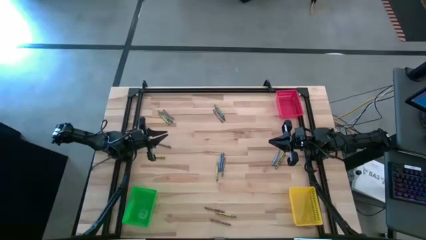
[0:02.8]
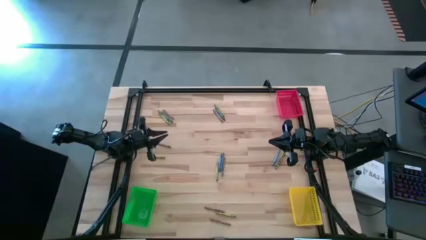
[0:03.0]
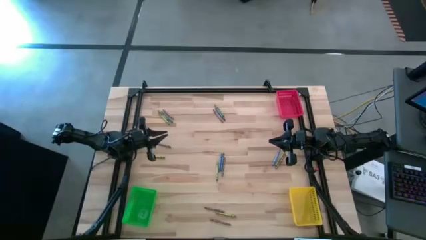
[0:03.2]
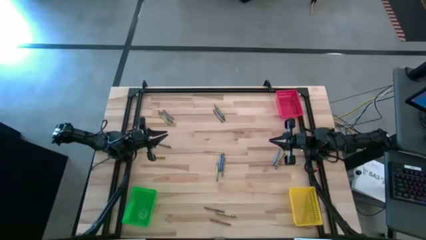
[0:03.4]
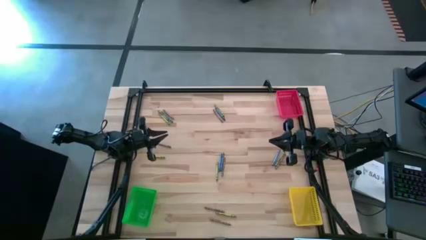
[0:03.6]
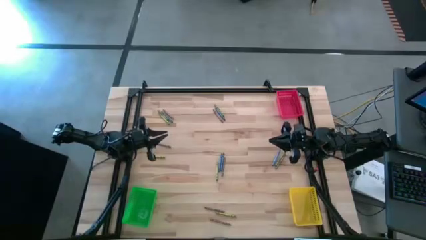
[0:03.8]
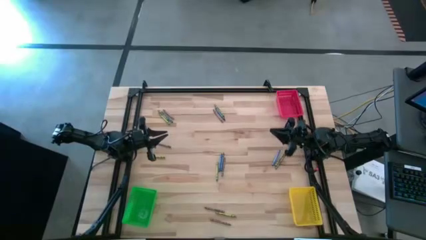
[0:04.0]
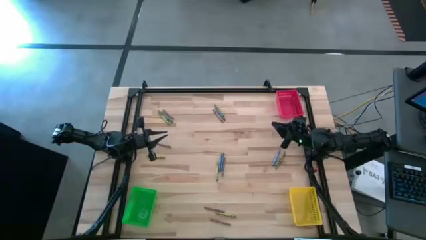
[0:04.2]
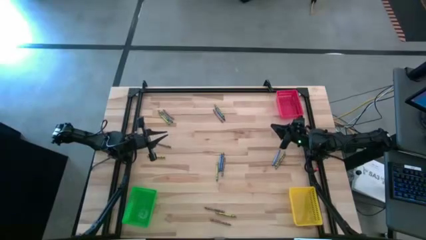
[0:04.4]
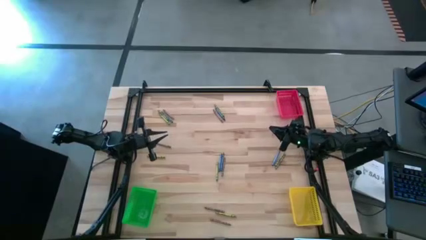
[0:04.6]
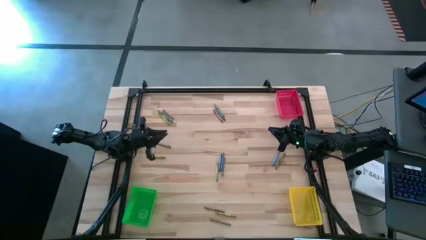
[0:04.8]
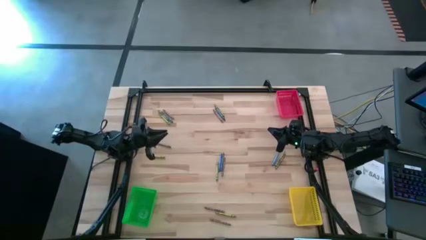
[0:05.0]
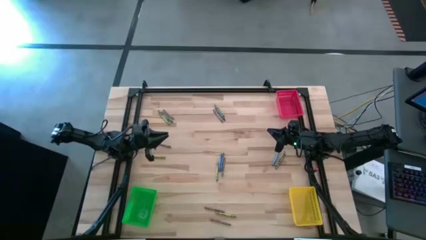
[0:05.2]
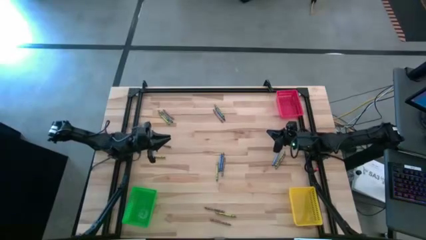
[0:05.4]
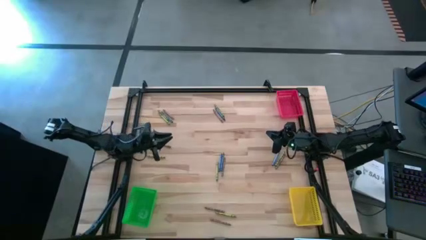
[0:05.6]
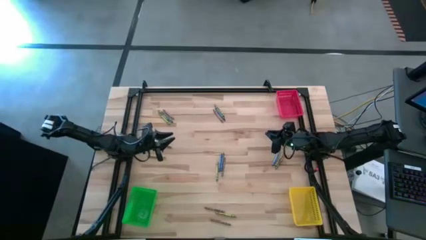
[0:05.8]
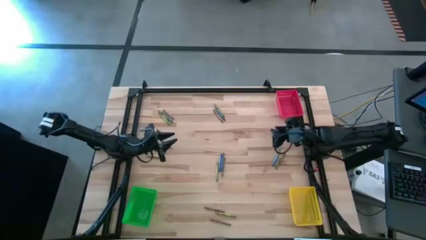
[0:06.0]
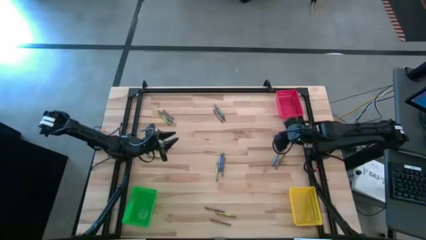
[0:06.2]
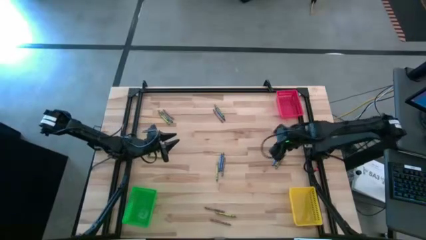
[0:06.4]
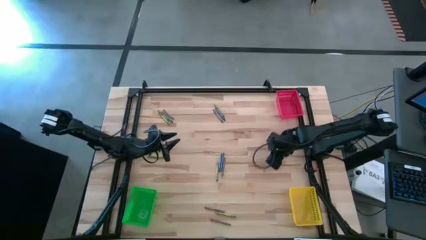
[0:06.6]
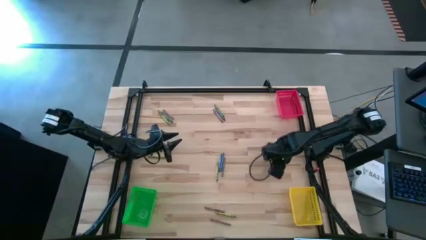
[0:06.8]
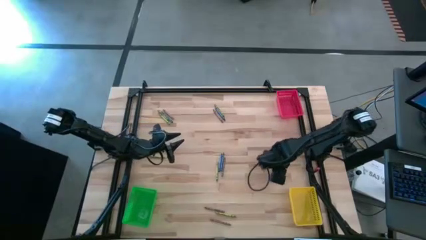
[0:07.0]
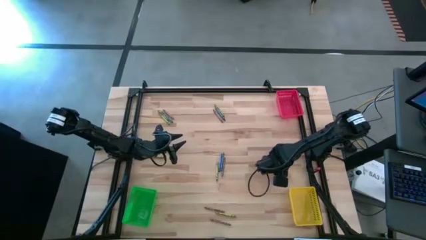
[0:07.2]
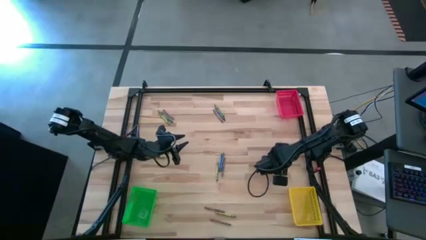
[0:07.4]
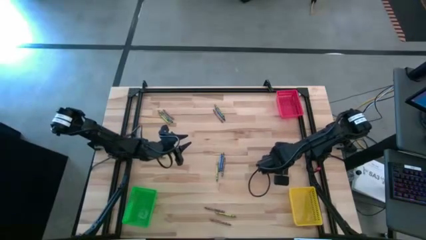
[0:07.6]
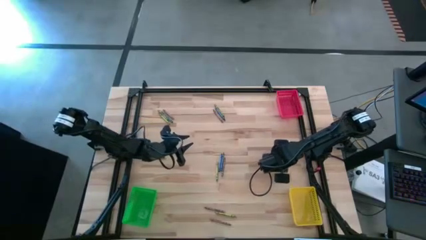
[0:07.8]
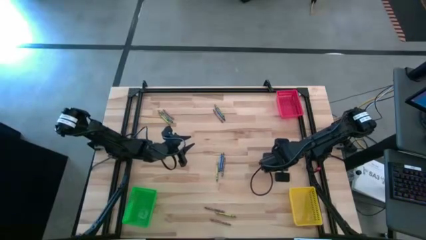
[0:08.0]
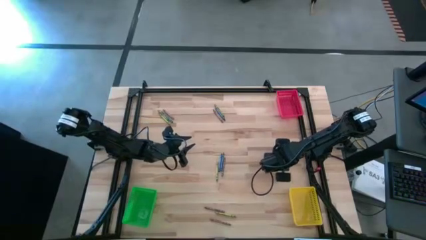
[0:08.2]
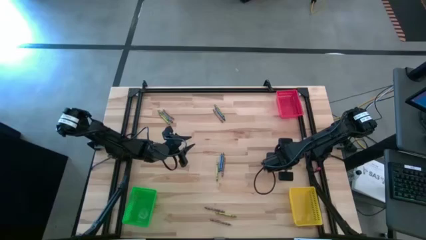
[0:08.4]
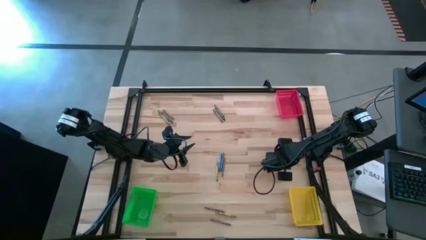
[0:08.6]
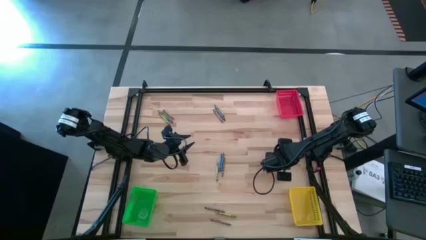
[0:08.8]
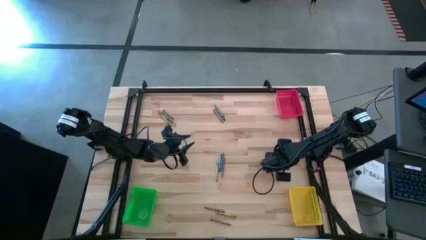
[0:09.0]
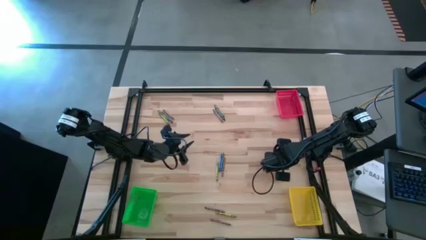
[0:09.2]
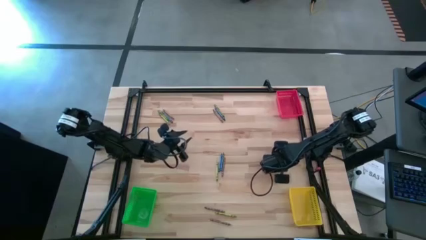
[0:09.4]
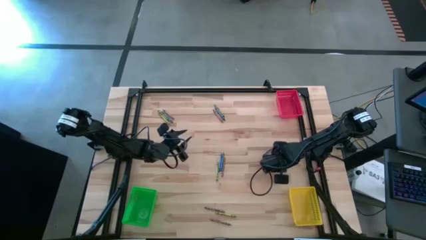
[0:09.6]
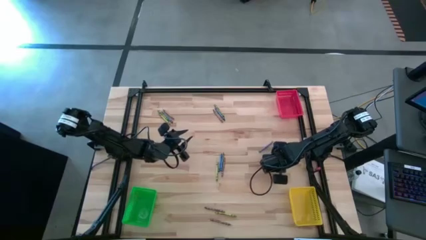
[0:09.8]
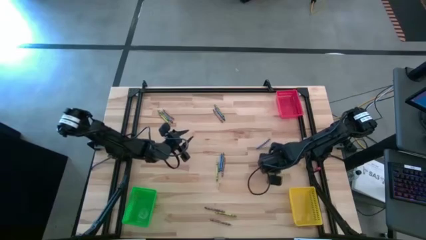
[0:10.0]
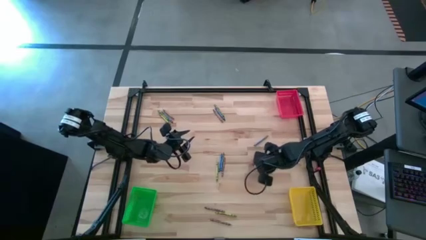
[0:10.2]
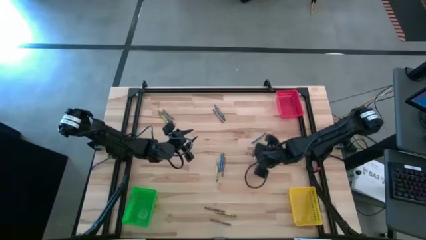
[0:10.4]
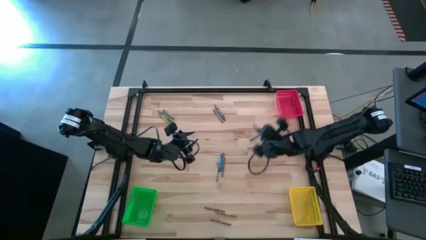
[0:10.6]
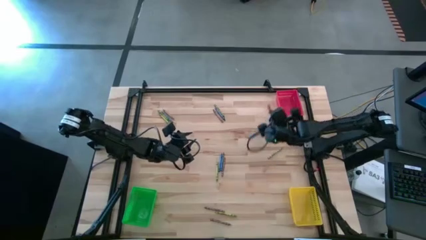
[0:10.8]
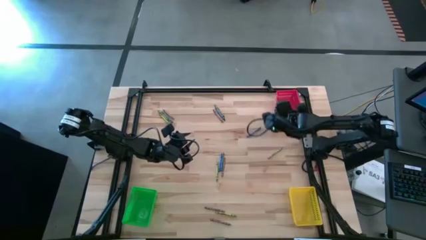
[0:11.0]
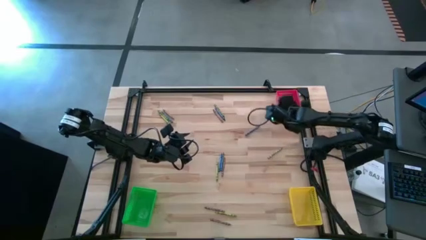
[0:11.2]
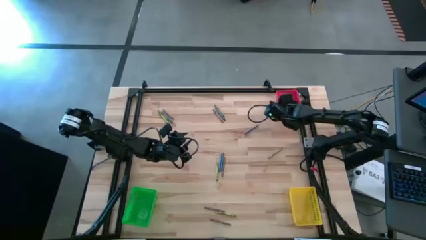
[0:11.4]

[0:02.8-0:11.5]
Task: Sort crayons
Put the brown crayon into the red bin

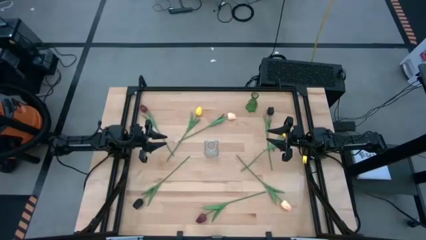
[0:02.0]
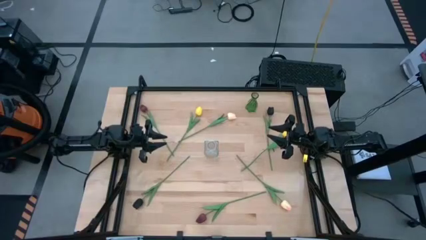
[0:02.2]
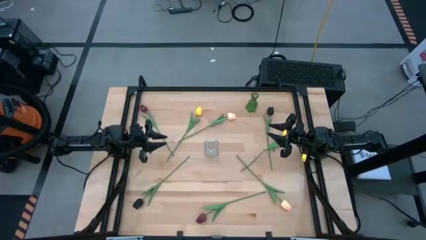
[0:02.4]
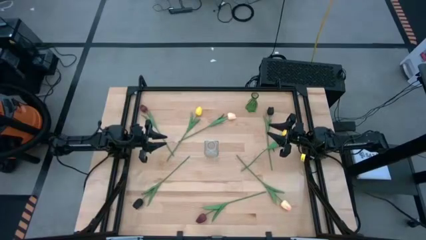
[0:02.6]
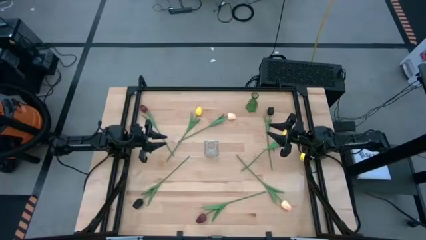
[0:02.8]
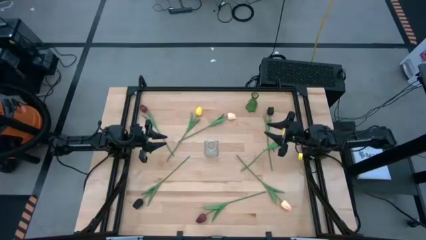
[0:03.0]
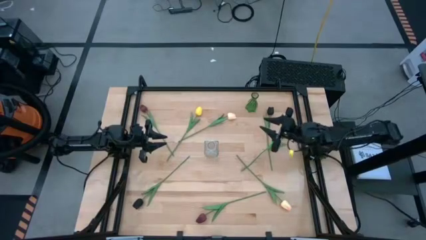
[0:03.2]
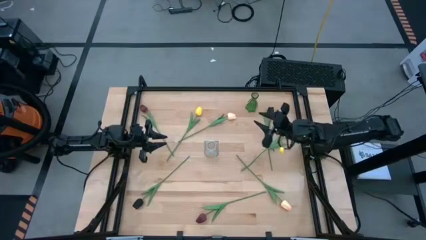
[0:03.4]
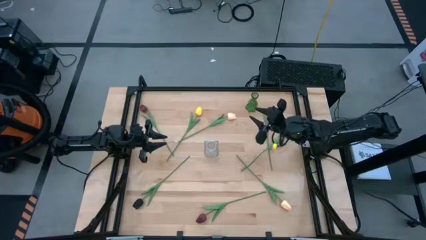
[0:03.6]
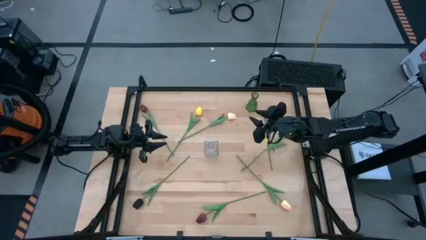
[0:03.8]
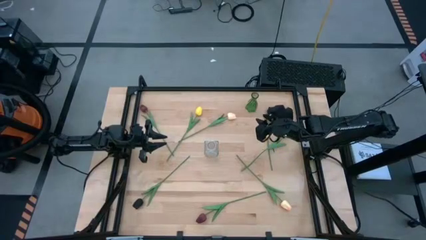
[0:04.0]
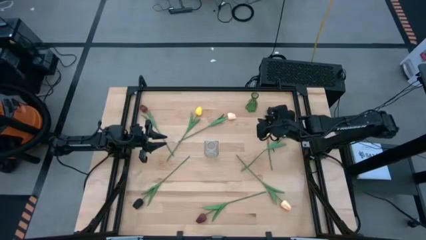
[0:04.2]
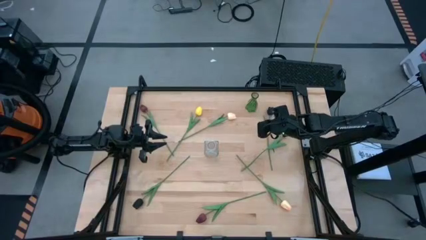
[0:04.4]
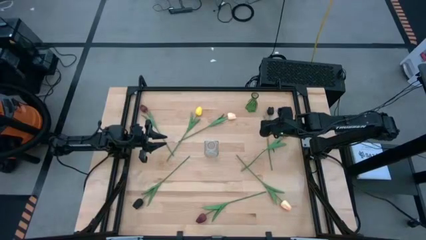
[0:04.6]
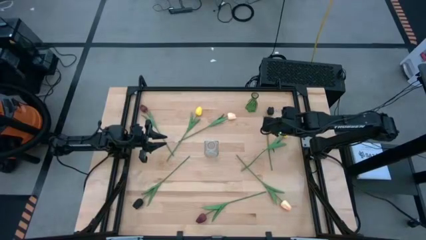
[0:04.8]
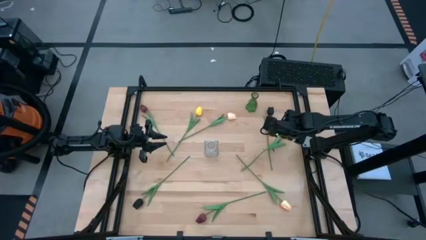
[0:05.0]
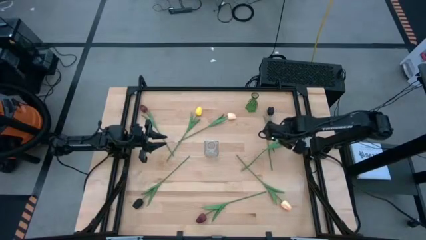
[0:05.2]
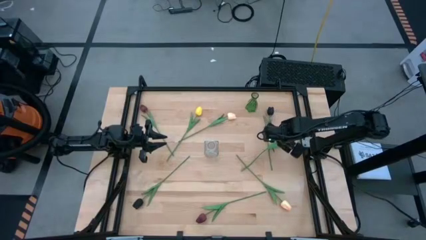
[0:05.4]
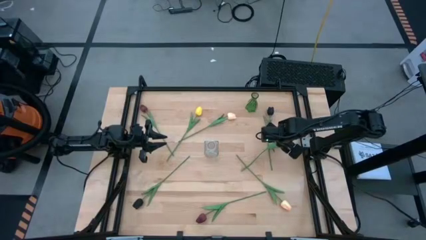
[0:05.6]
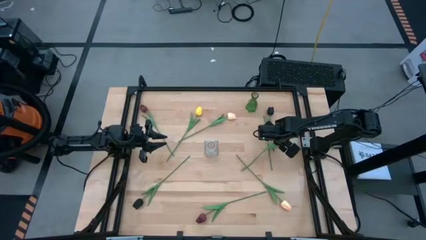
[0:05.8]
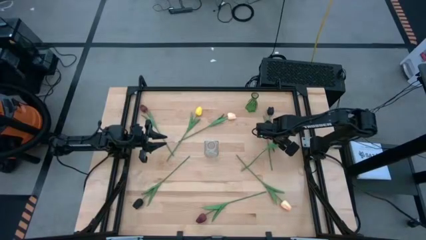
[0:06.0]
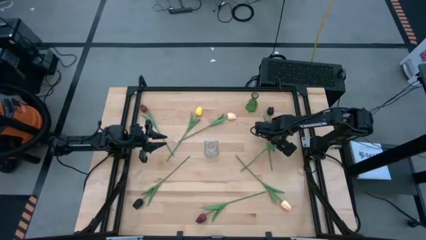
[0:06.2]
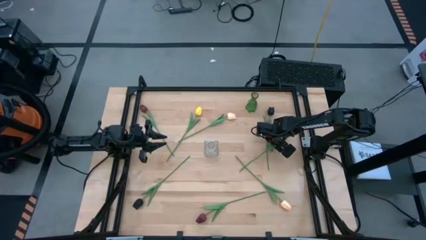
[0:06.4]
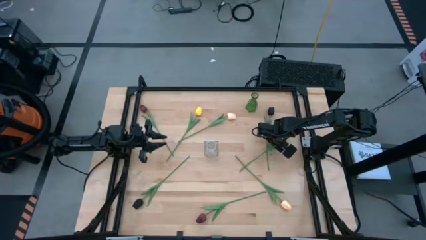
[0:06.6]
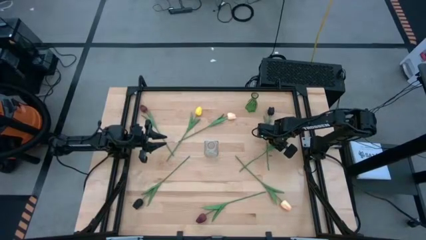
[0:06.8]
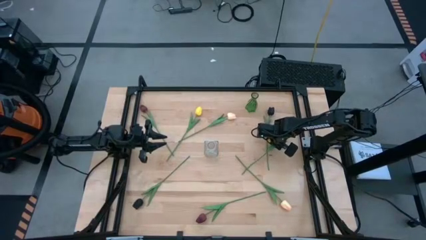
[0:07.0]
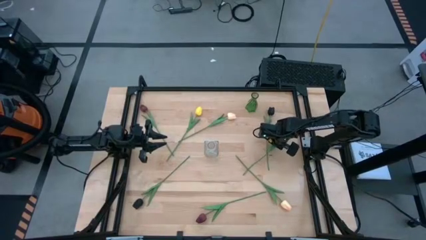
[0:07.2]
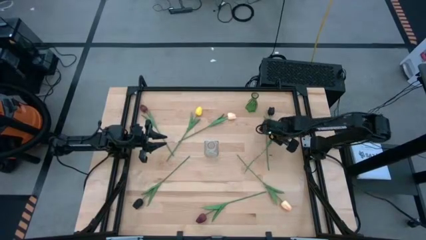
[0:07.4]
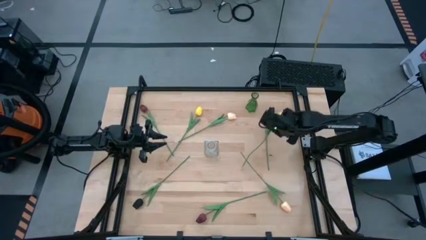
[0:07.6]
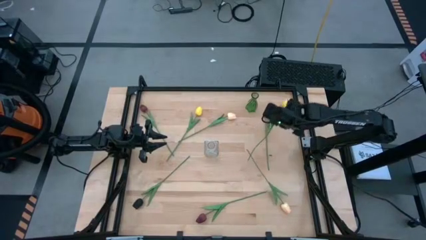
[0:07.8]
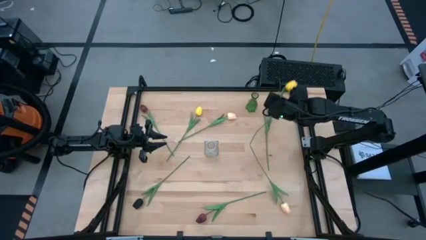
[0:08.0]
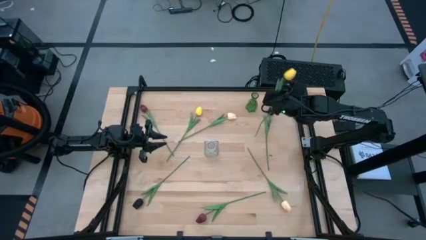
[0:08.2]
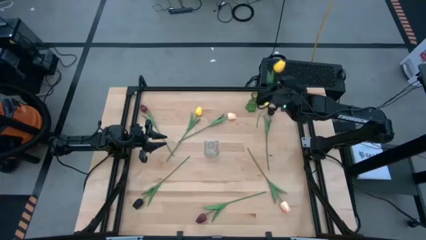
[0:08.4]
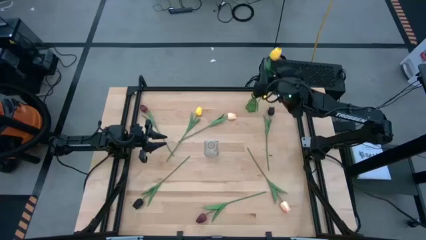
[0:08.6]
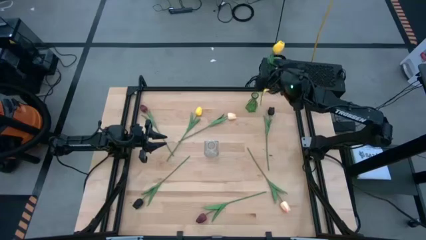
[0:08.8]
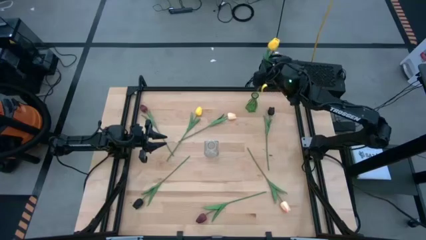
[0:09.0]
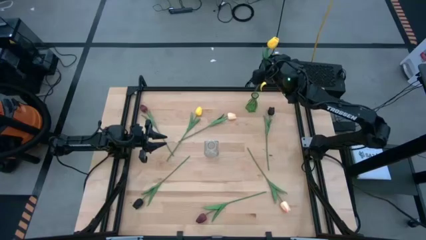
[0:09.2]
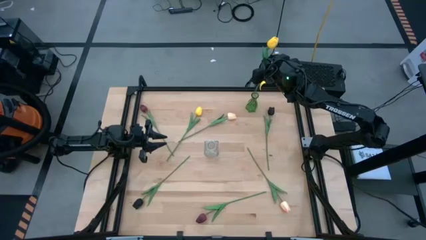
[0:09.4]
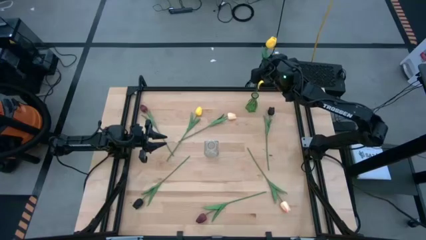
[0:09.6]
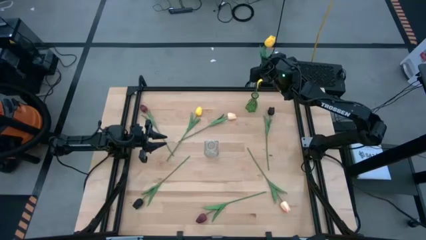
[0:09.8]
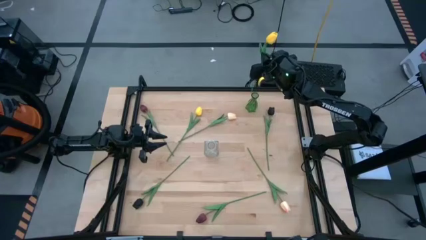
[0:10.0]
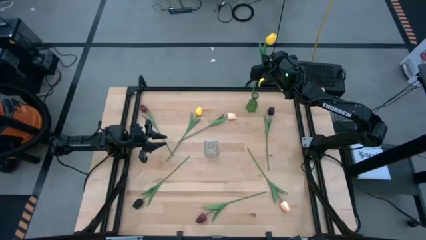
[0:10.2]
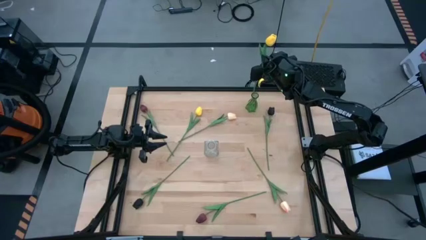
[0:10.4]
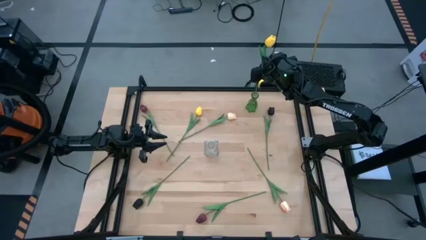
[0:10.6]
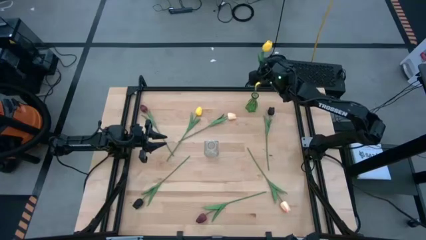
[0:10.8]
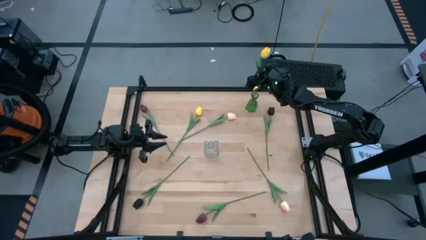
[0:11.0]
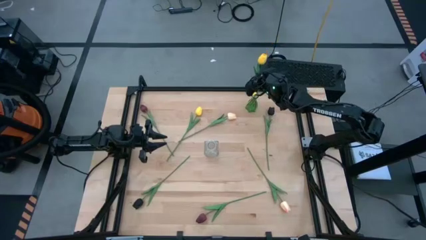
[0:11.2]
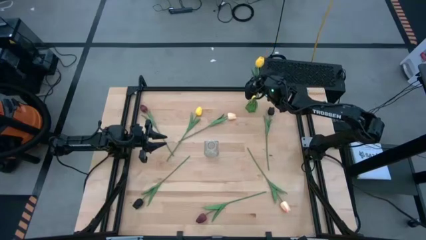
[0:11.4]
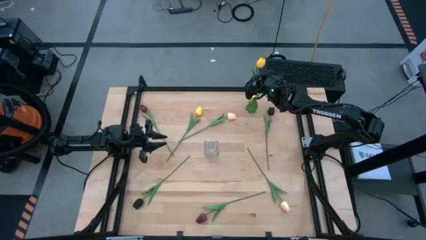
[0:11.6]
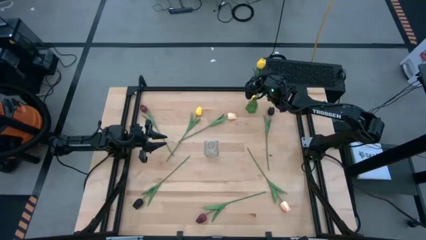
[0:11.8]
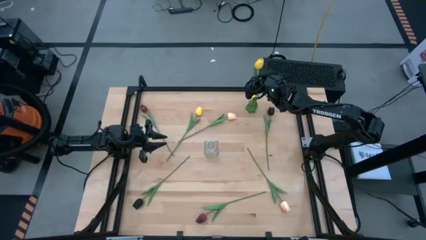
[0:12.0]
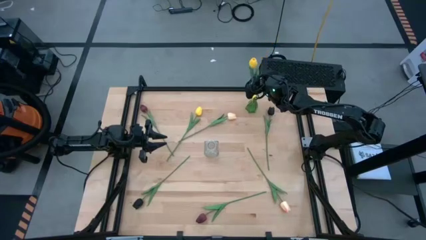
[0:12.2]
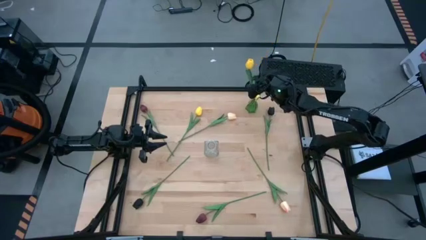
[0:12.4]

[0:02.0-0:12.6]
Task: Sort flowers into vase by color
Put the right yellow tulip into the green vase
